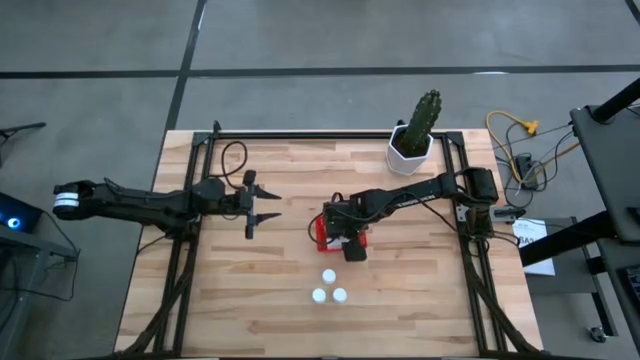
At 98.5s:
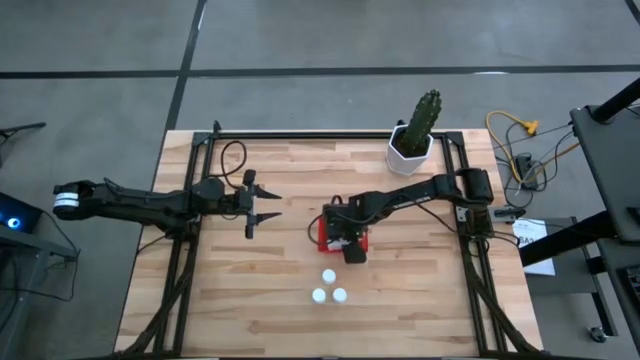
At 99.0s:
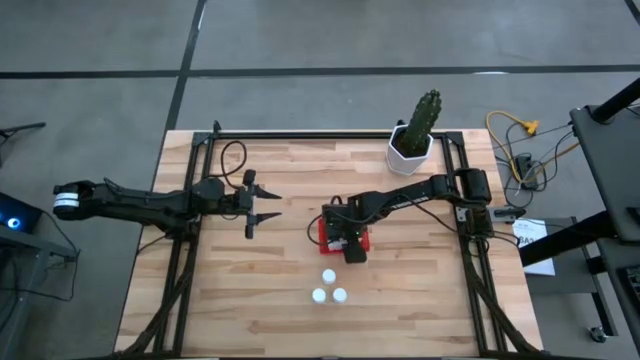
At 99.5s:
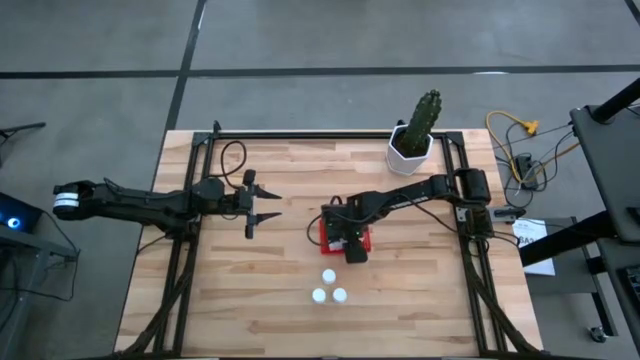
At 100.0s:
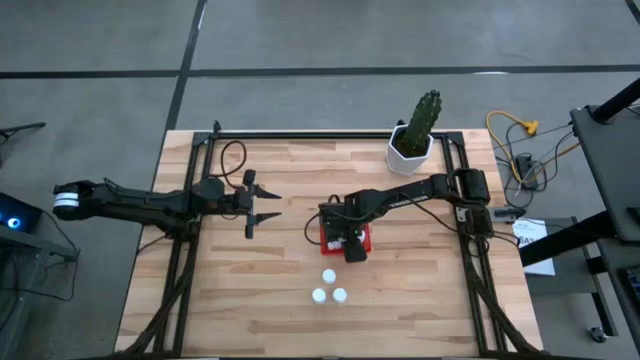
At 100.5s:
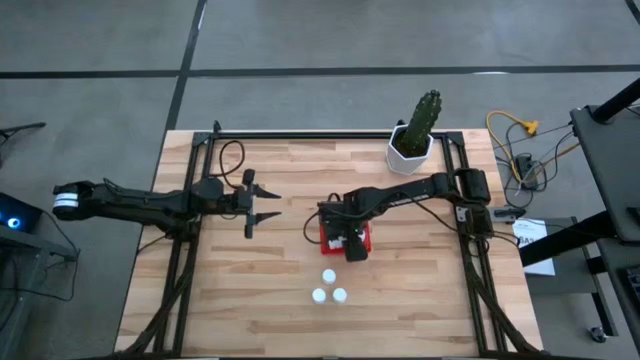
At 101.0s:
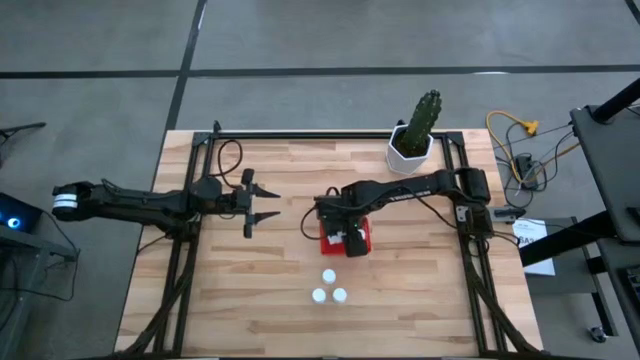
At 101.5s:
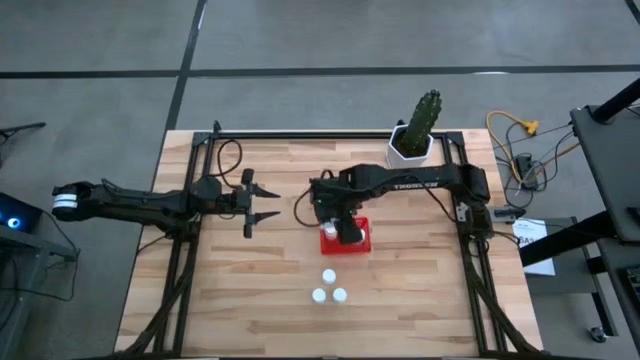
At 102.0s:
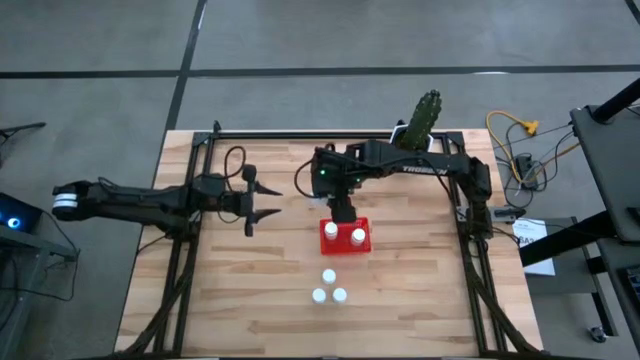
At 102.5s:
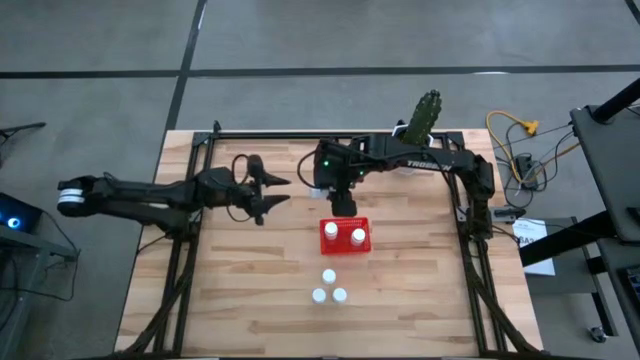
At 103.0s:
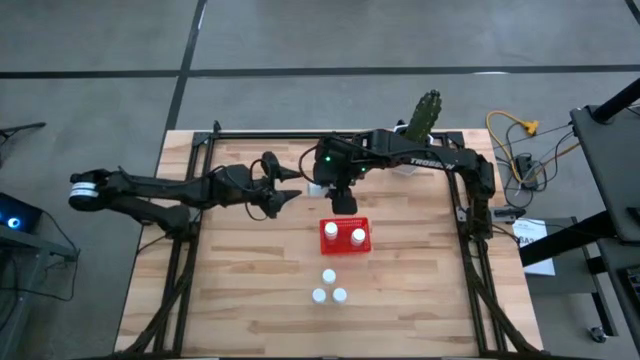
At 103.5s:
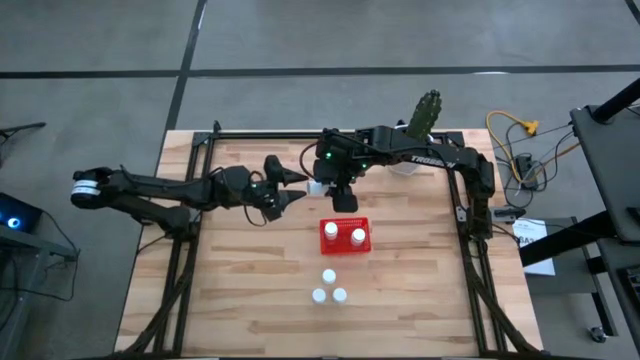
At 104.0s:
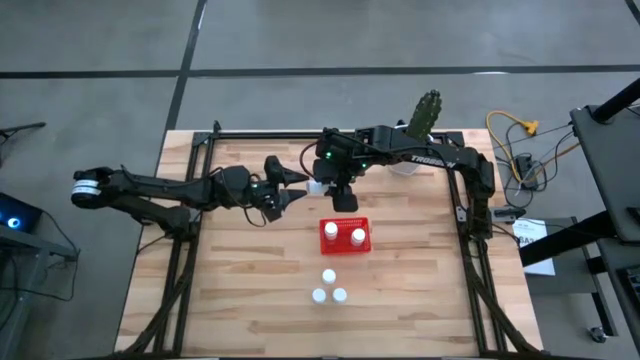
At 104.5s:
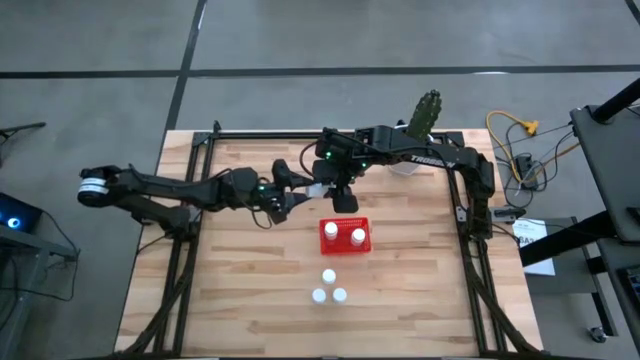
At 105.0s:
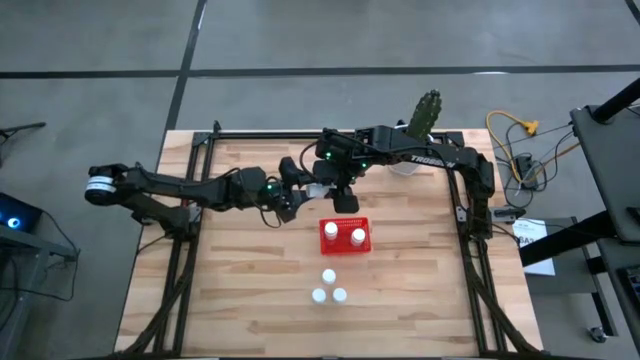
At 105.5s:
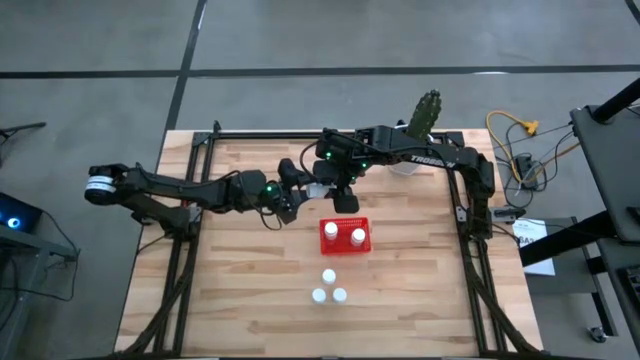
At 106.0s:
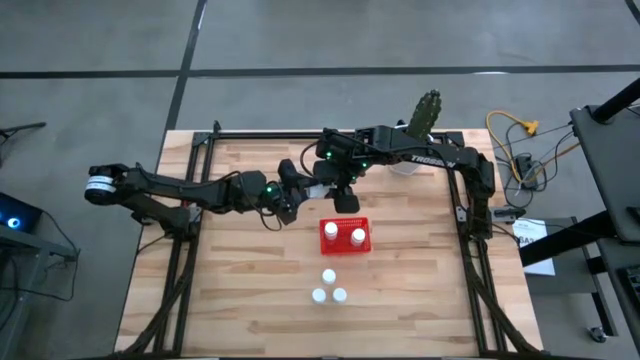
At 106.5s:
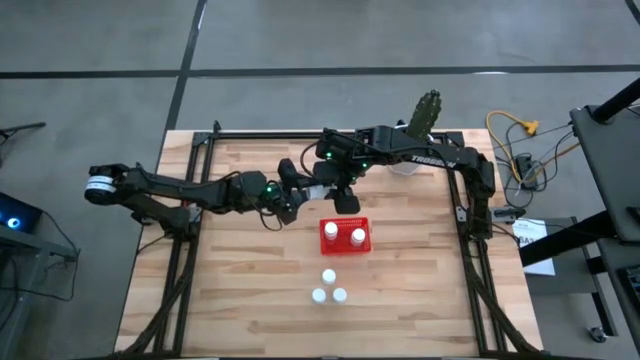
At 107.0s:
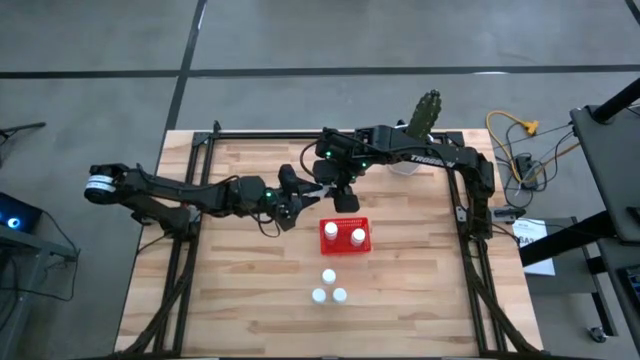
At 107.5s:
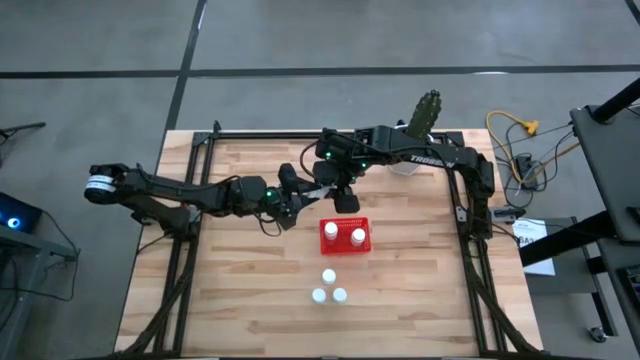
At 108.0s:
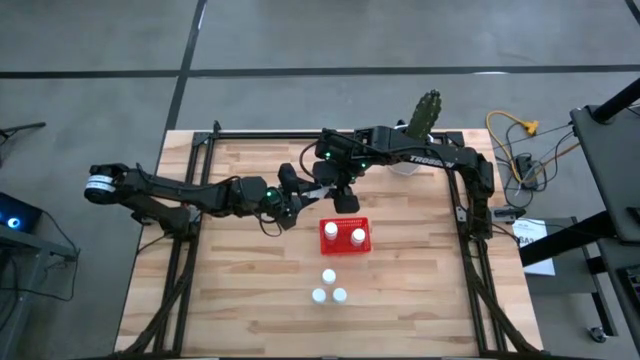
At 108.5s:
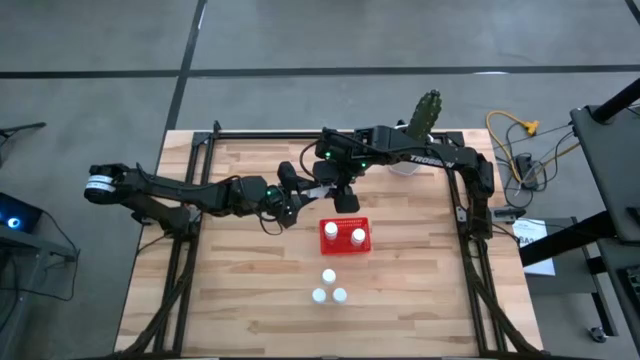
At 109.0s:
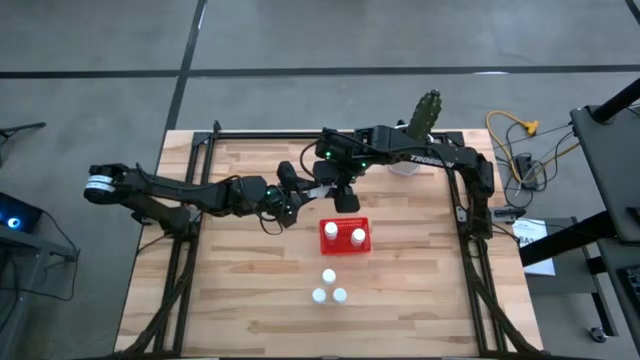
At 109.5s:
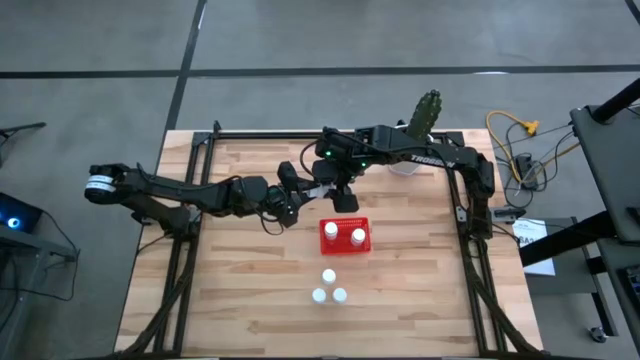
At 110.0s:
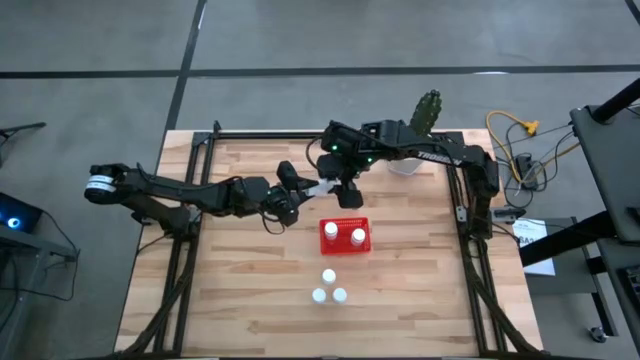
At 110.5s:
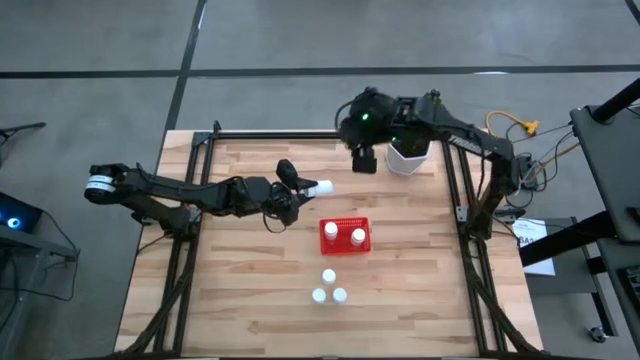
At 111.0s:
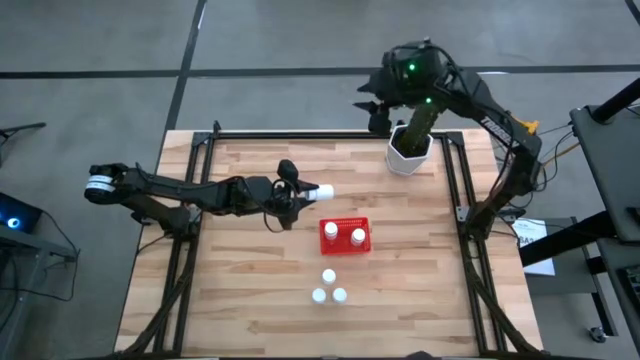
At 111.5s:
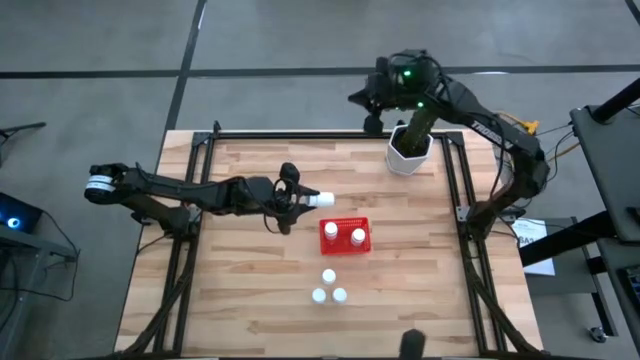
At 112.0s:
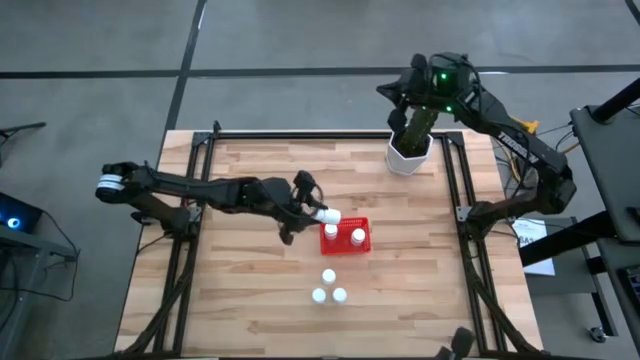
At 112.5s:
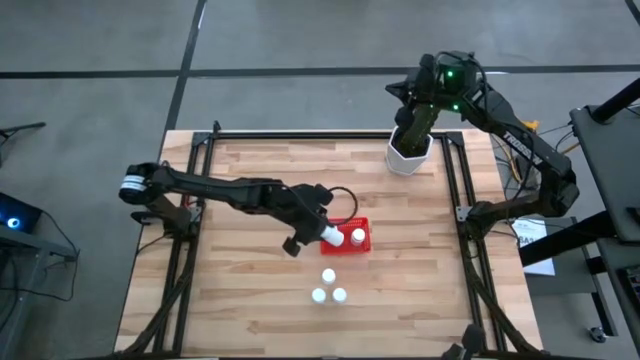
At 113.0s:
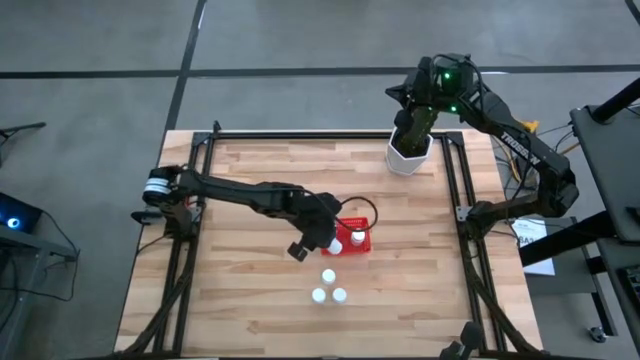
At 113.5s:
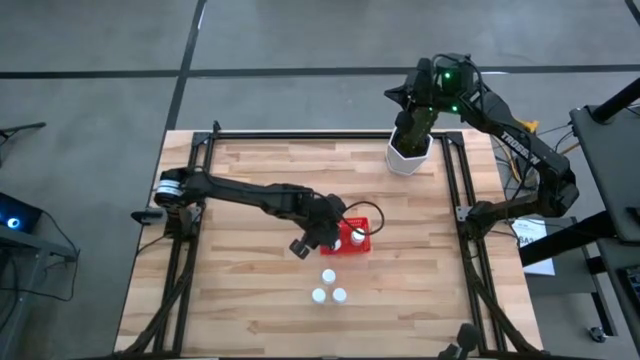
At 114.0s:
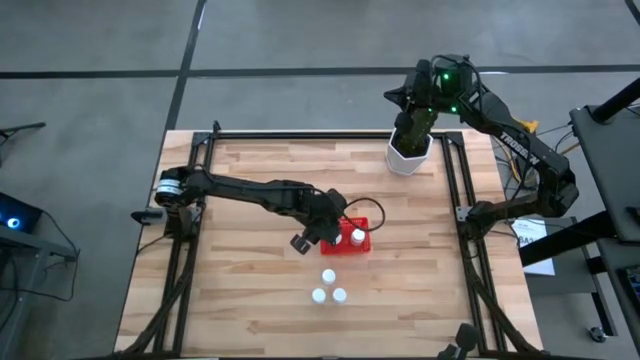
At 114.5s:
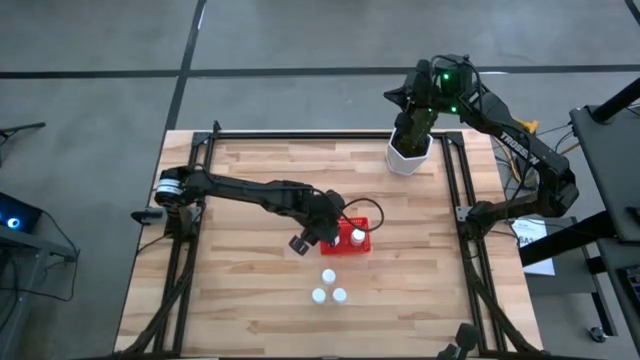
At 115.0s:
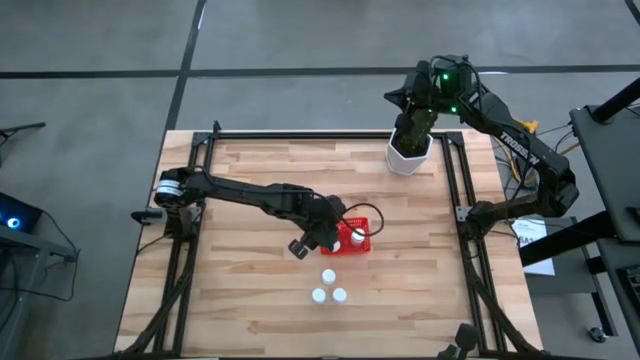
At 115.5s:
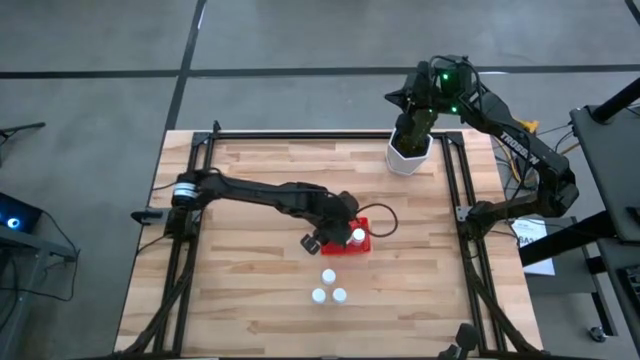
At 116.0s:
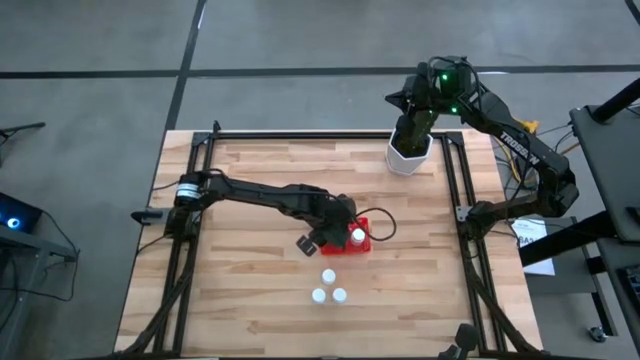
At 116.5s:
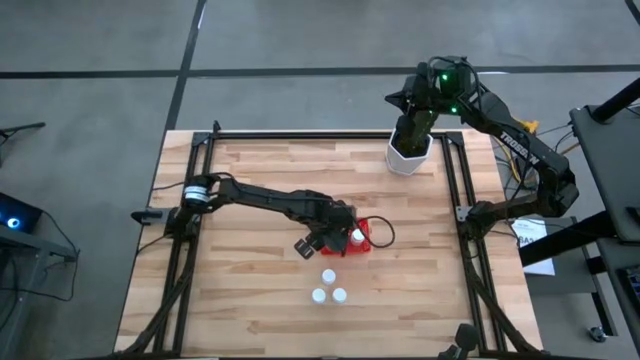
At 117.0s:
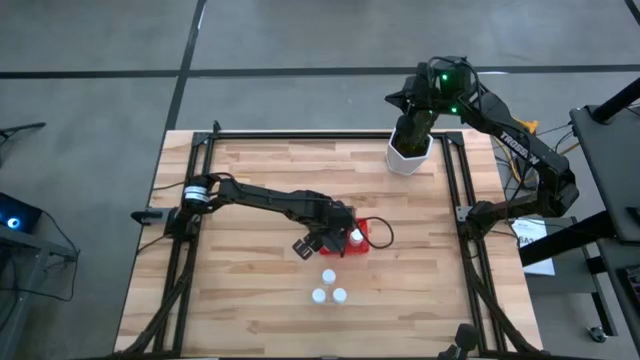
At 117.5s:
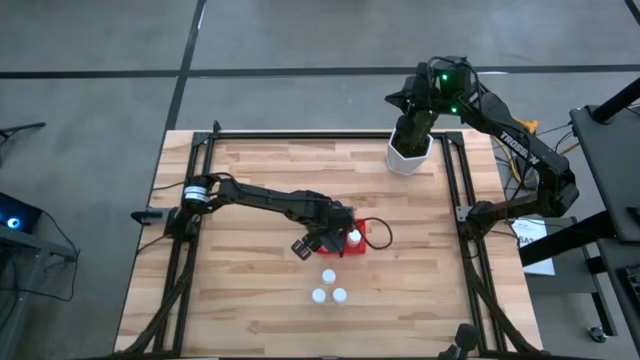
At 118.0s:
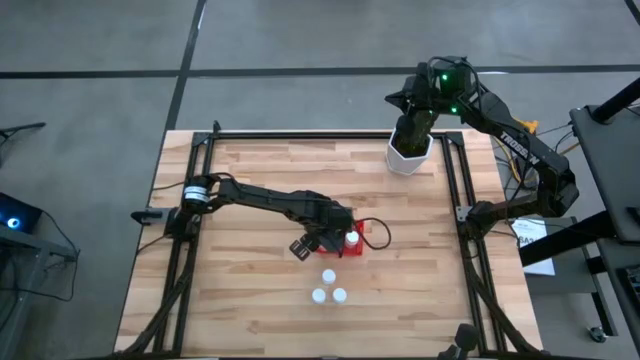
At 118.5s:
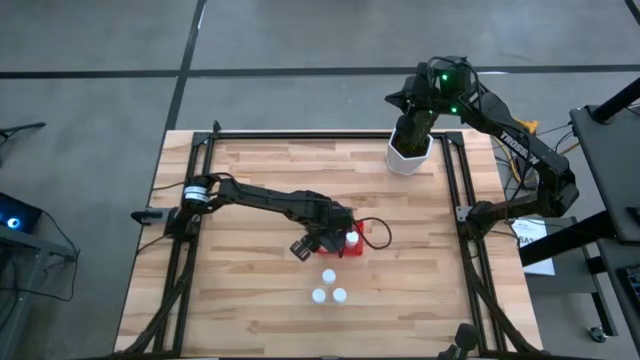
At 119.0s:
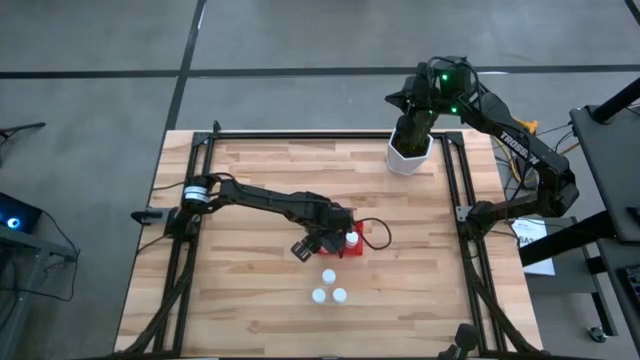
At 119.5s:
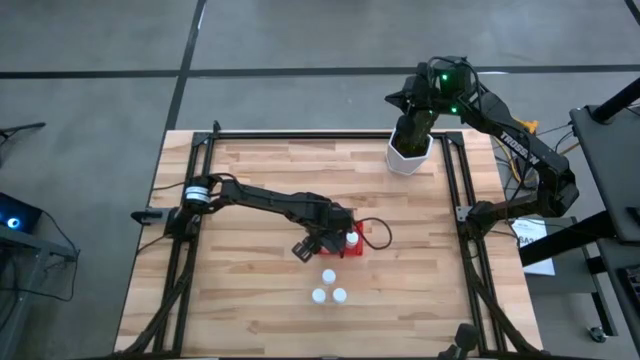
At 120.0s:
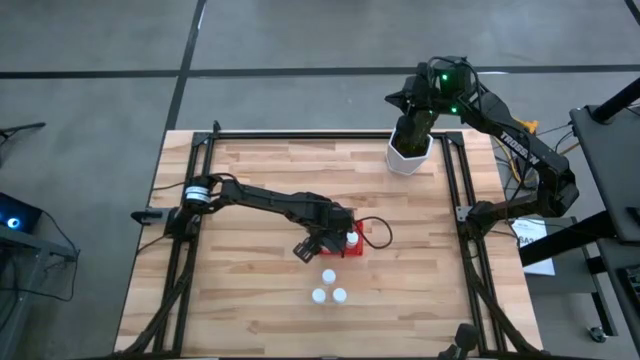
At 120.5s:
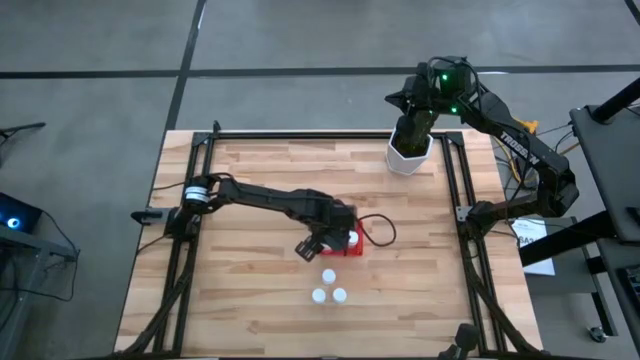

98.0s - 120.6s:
Task: Pick and place pill bottles into a basket
Adjust the white pill bottles in the red basket
